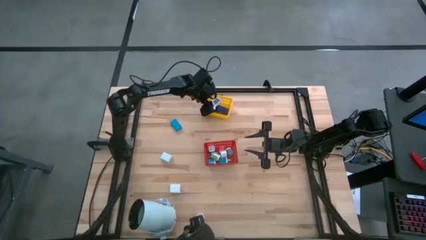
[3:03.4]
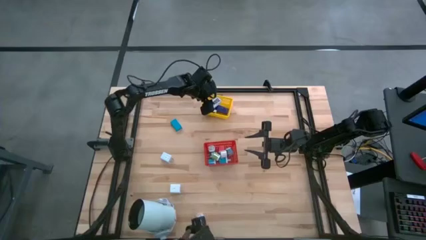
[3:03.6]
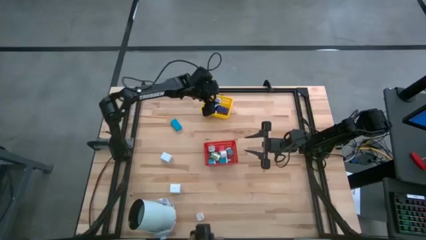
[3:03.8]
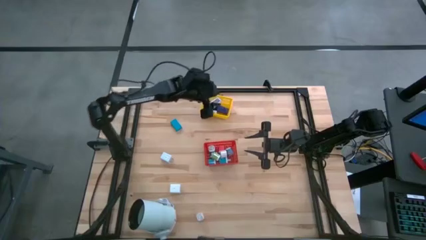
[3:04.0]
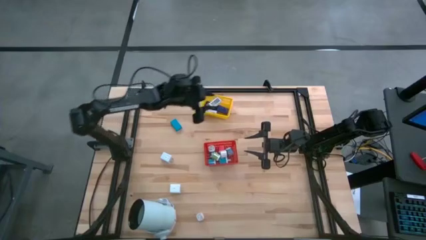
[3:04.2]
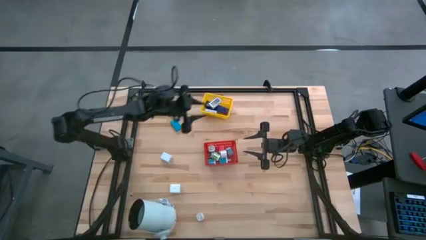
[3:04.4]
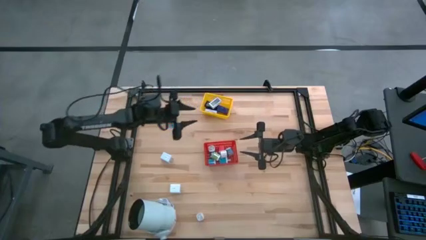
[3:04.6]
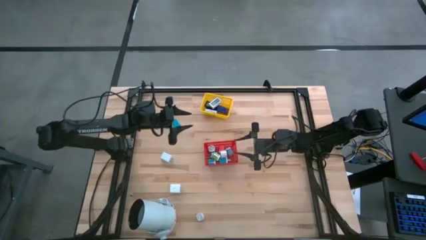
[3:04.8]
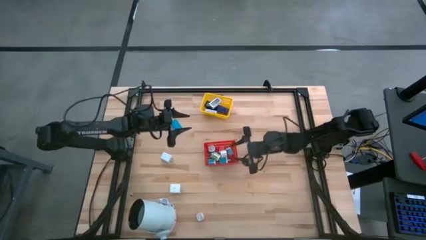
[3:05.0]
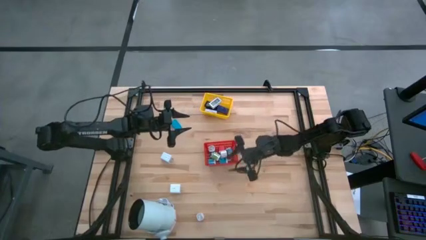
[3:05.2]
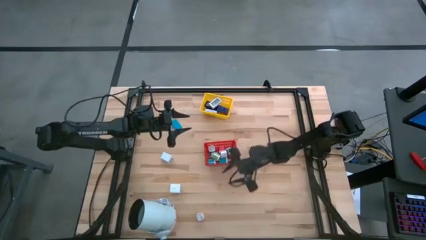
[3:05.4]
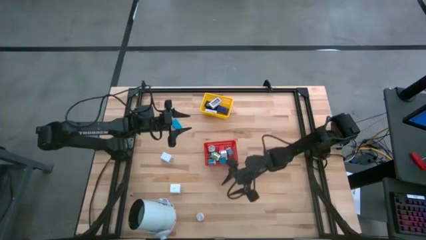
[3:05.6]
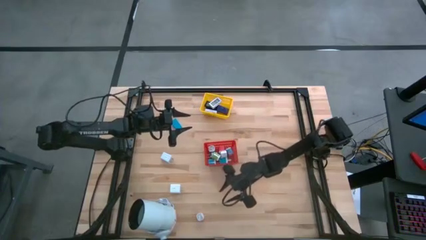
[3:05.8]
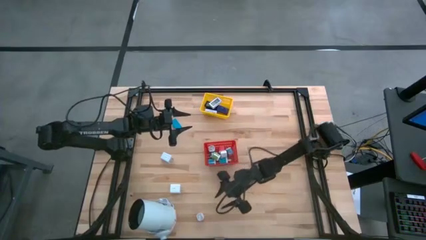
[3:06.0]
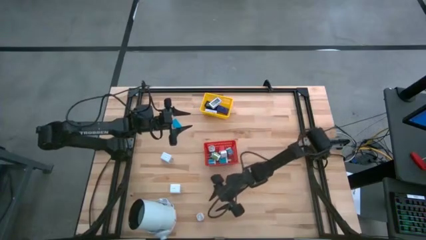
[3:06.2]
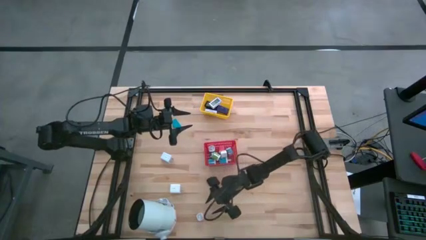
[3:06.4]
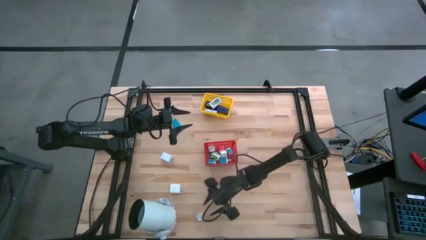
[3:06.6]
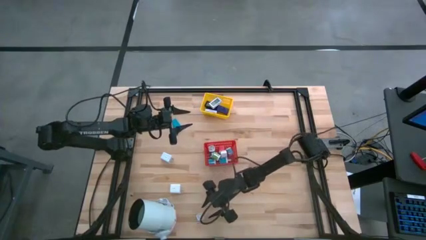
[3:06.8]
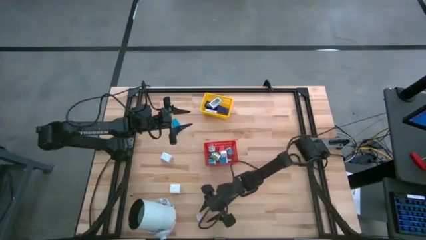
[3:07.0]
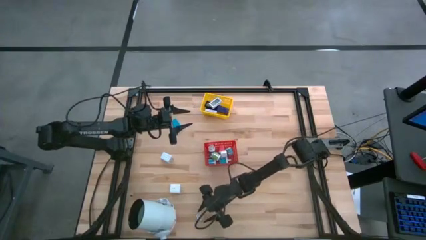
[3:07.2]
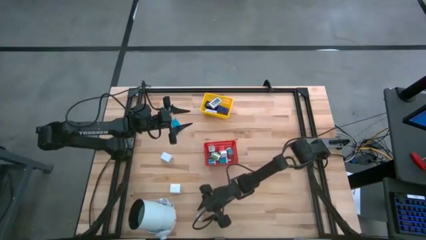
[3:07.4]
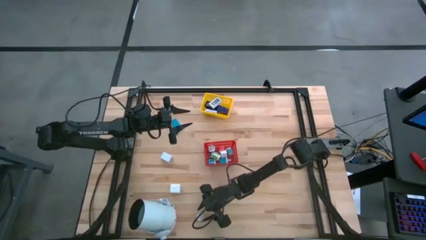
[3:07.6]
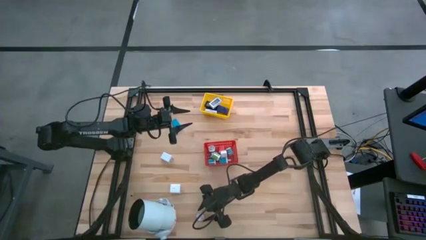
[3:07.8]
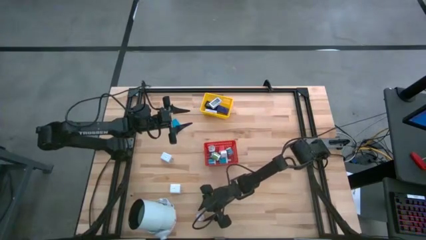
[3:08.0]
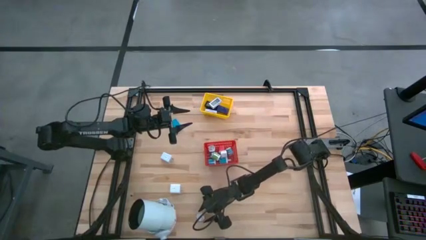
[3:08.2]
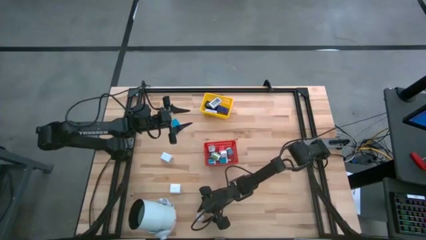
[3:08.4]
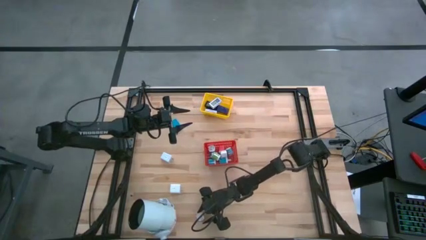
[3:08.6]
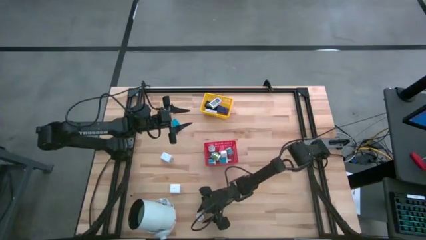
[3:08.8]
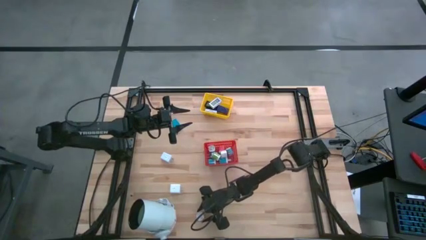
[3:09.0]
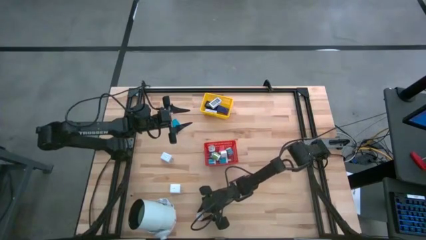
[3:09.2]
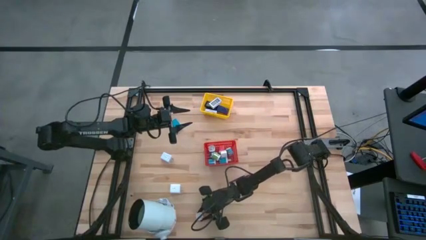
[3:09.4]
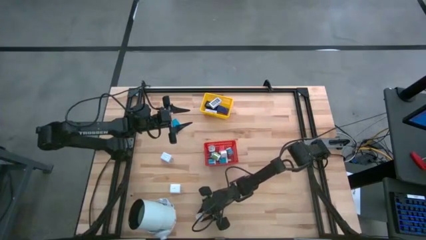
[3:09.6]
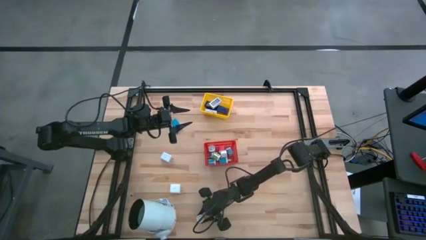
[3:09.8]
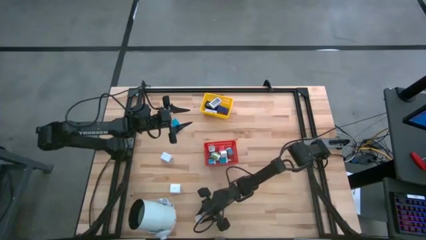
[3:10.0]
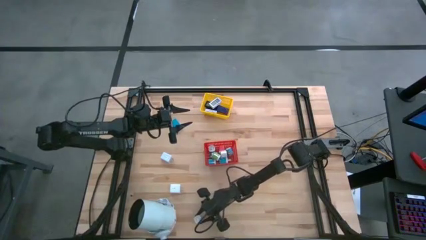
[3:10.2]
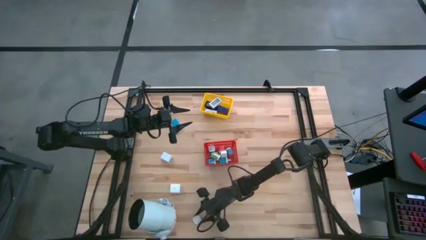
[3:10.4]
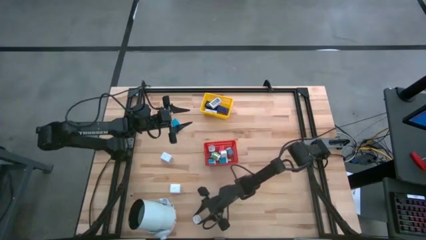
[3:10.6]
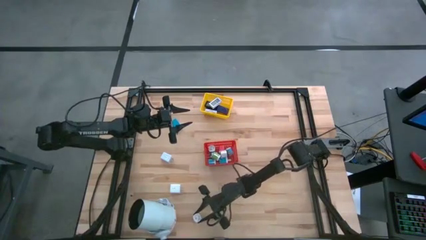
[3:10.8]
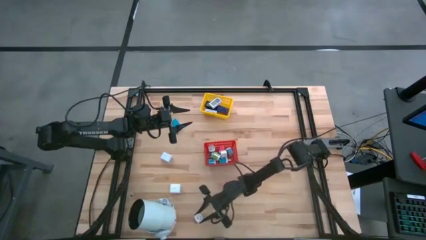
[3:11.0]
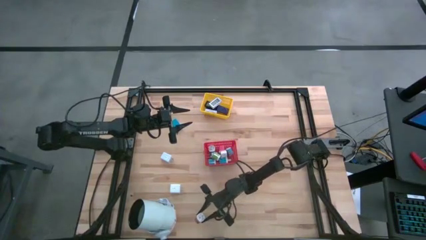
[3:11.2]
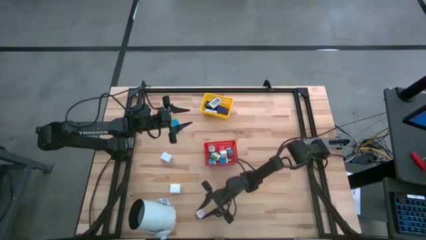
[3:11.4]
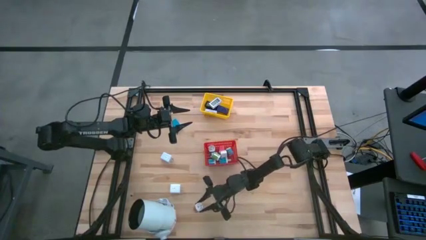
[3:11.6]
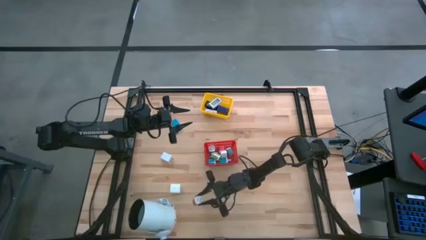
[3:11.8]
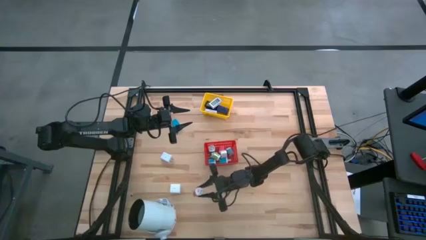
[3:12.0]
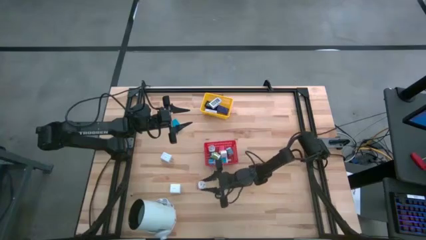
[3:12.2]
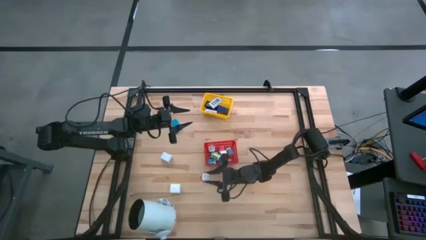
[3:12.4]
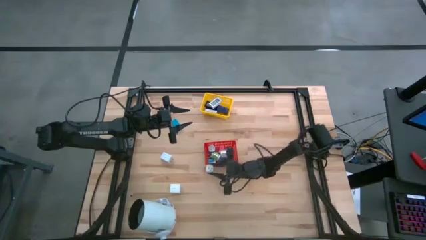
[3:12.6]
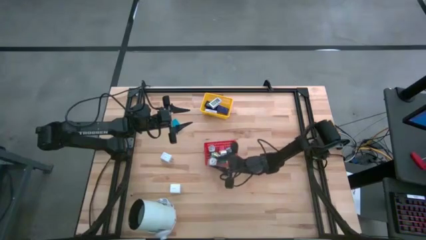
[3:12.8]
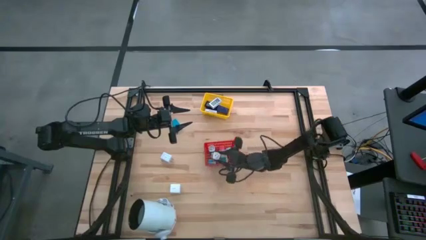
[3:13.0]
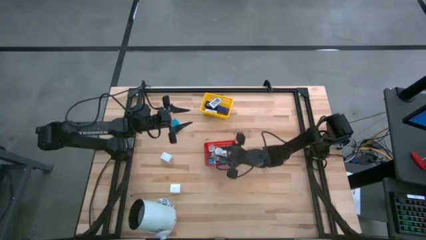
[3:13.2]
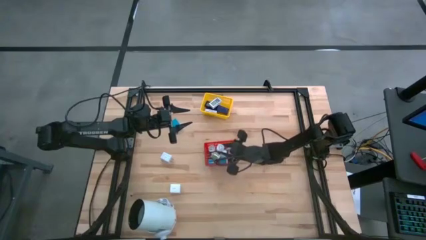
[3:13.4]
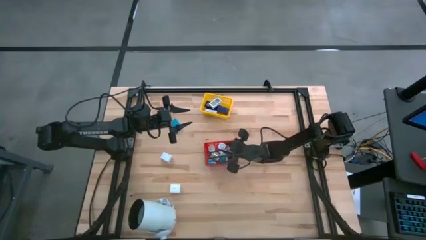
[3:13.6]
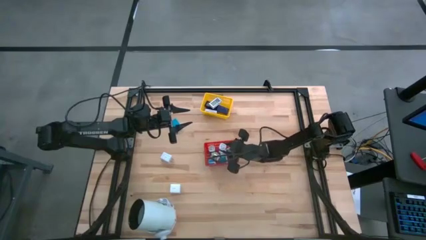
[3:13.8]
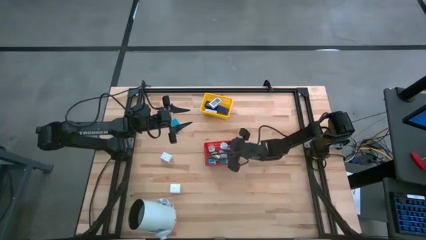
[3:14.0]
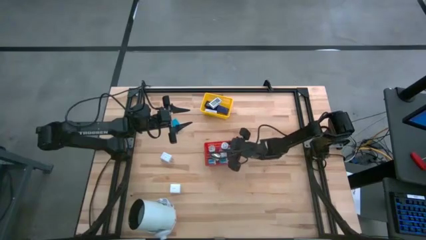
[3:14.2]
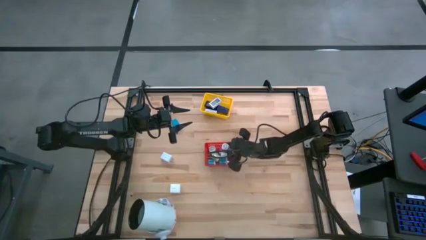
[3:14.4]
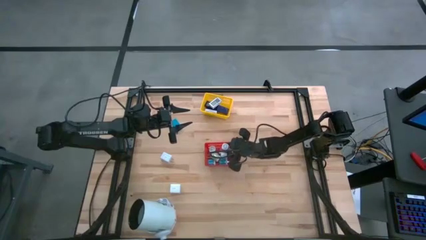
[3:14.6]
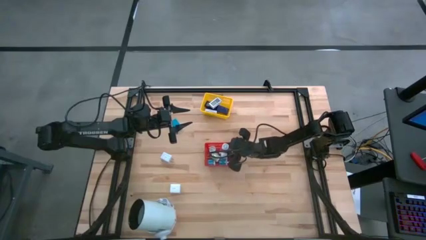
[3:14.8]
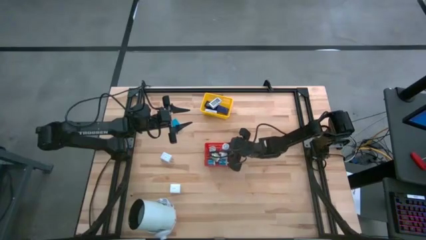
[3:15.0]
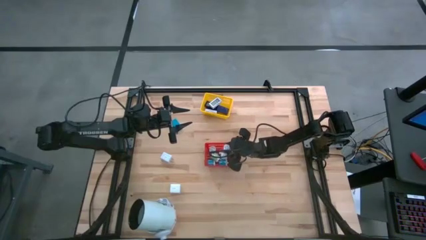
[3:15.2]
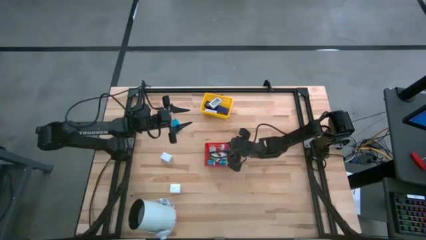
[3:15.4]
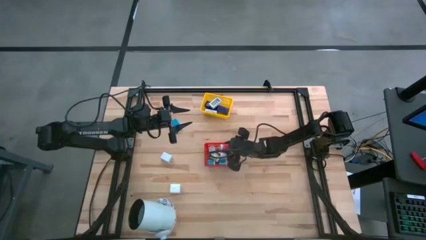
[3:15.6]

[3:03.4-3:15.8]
Task: Pick & Place Office items
Put the pink charger adapter into the red bin

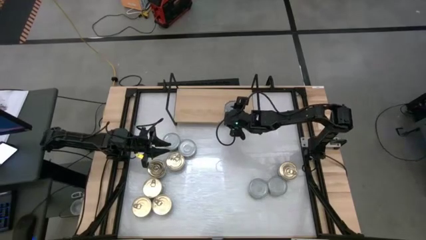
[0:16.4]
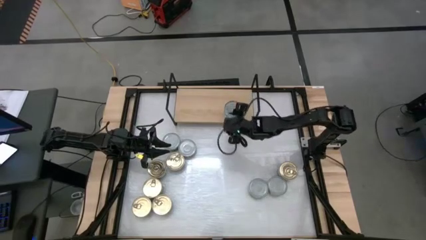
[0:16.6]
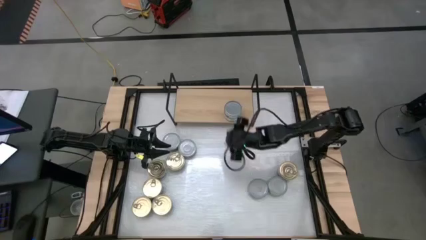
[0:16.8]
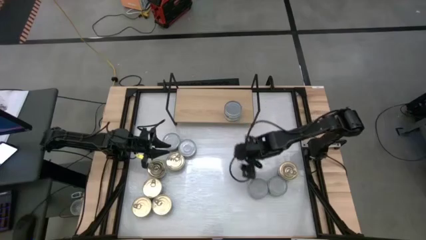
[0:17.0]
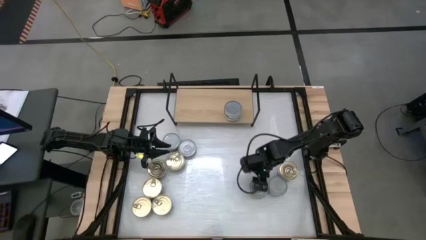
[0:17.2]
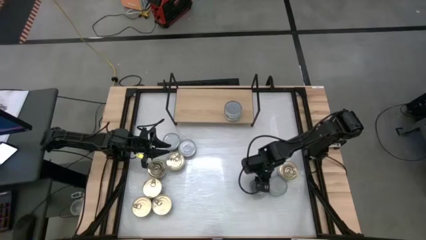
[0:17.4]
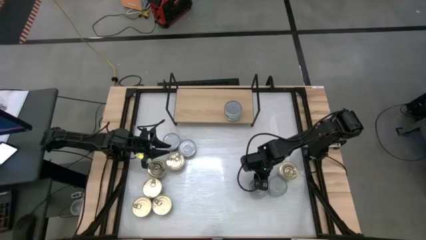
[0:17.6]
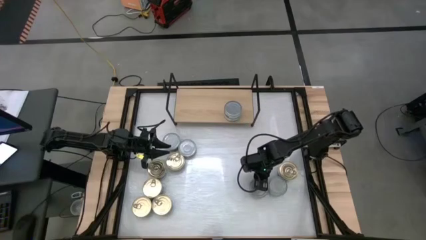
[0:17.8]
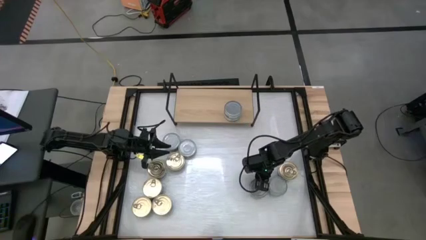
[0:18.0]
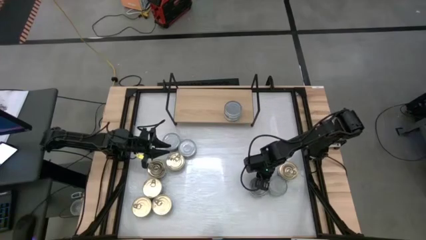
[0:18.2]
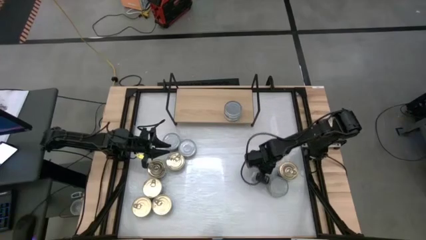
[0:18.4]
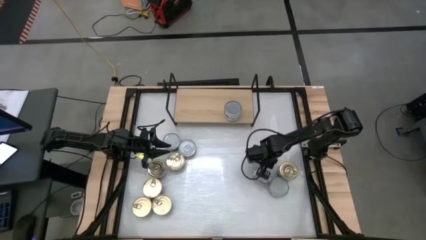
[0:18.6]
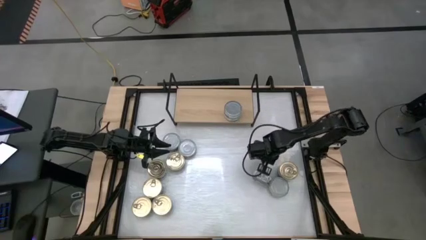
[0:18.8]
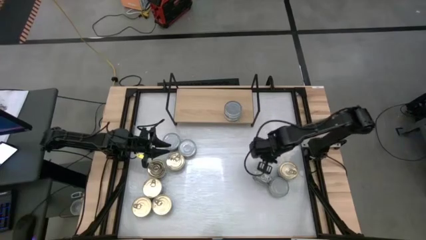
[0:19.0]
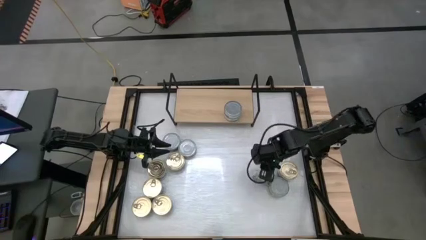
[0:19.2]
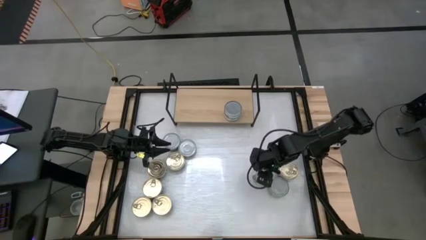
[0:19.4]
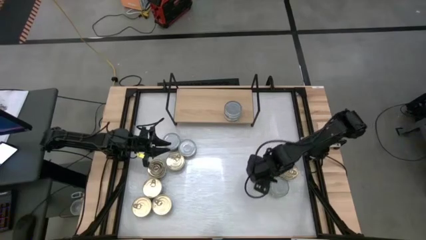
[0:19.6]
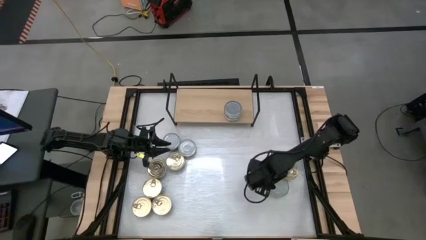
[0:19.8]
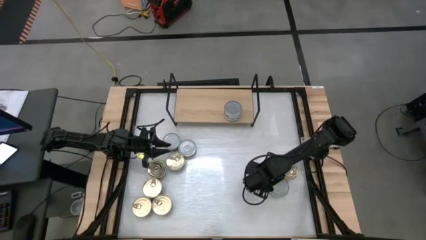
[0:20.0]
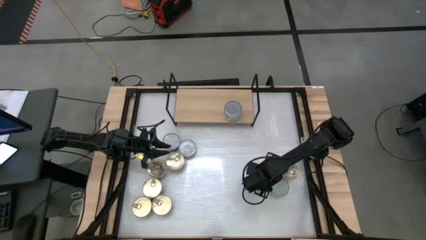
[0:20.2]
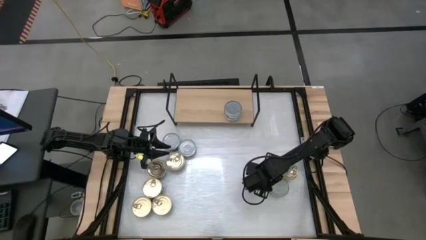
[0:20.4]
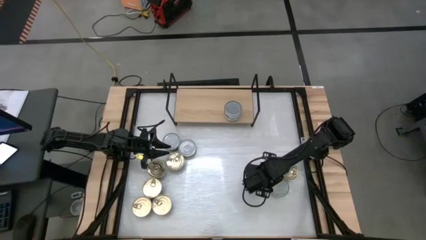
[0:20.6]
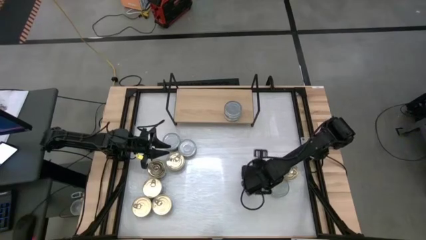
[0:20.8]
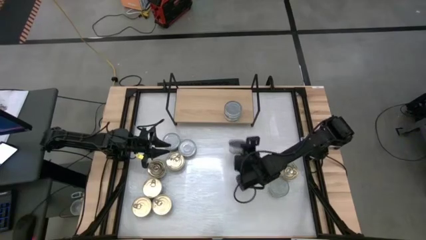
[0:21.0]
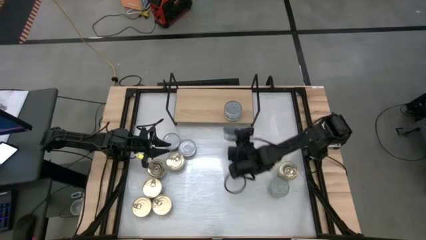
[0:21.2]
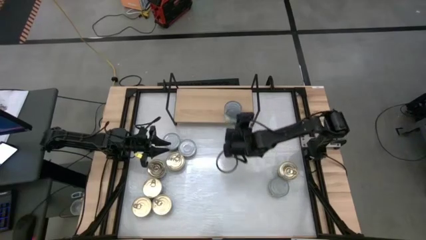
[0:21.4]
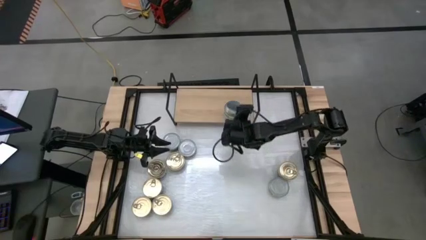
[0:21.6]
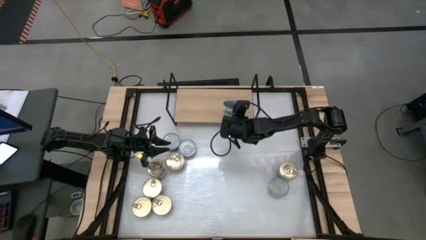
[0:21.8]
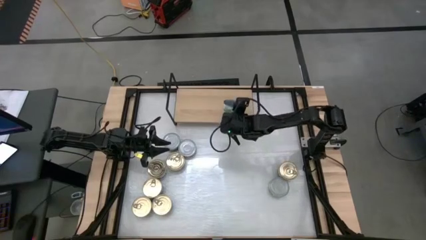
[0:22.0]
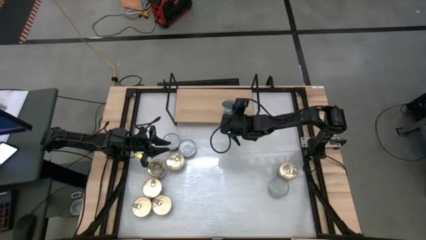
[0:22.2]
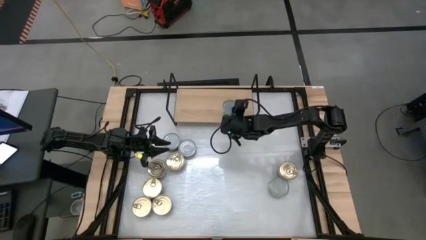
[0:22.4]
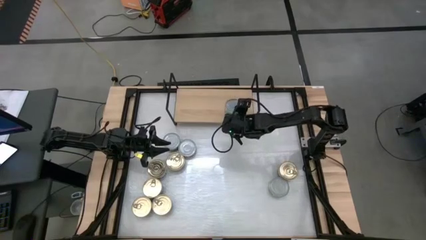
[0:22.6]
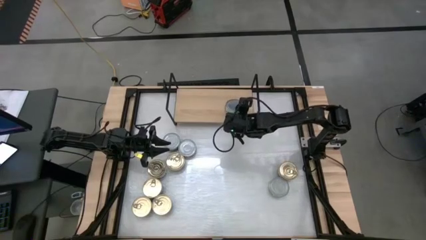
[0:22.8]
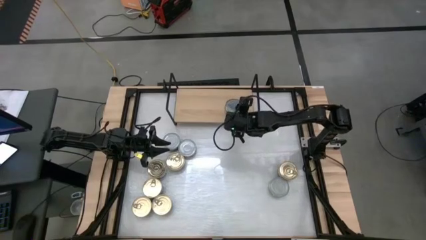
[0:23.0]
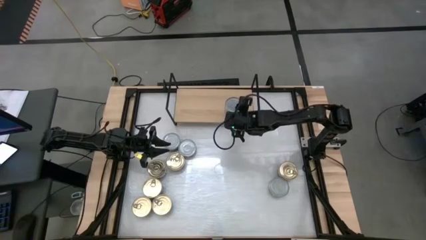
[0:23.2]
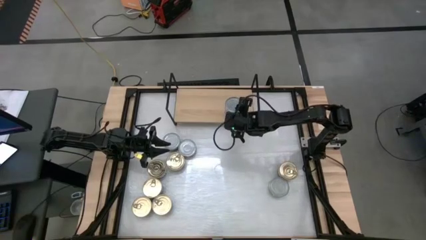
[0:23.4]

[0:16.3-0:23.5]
Task: Stack canned seafood by type on shelf
Stack the green tuna can on top of the green tuna on the shelf
